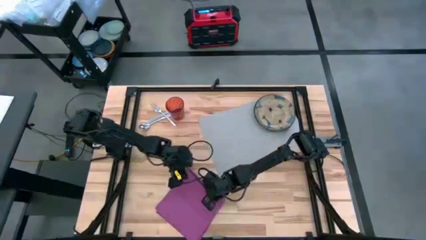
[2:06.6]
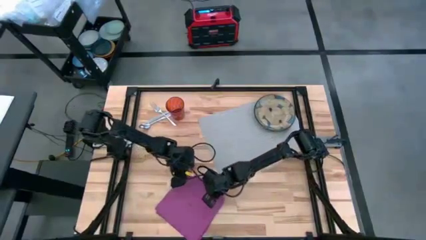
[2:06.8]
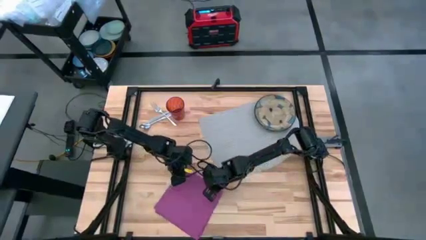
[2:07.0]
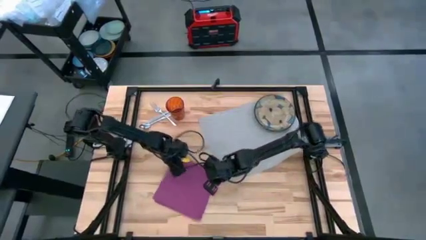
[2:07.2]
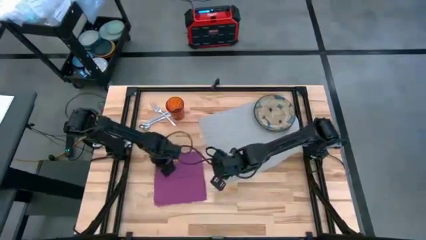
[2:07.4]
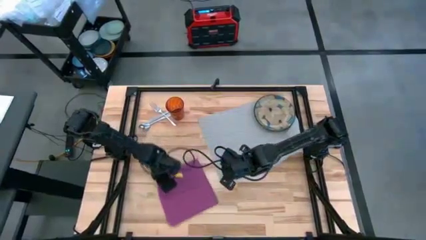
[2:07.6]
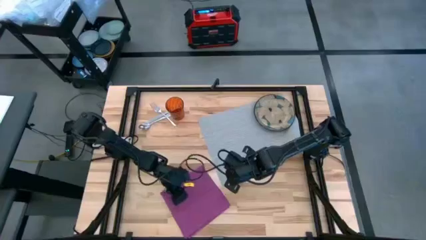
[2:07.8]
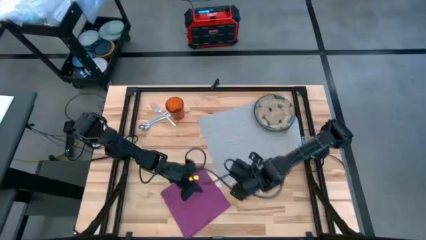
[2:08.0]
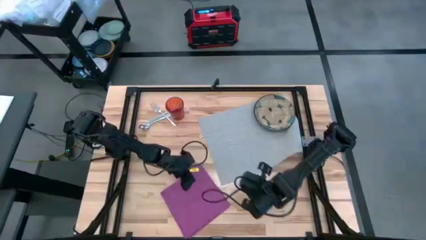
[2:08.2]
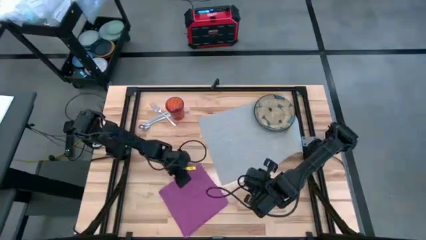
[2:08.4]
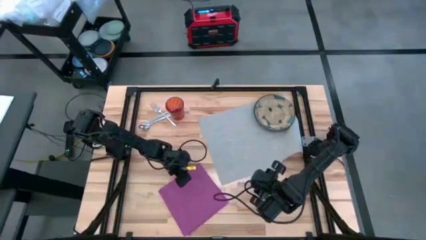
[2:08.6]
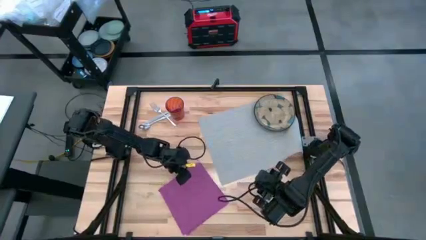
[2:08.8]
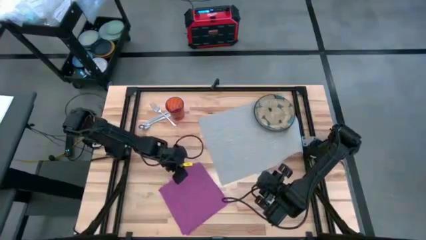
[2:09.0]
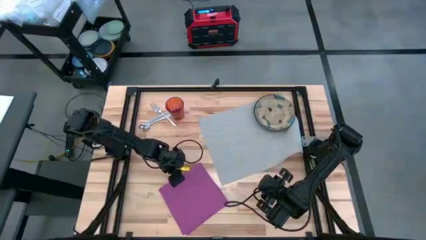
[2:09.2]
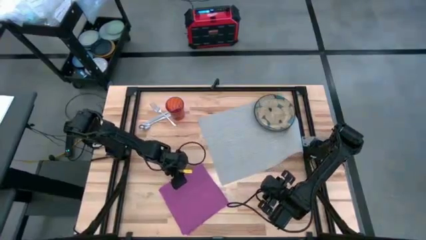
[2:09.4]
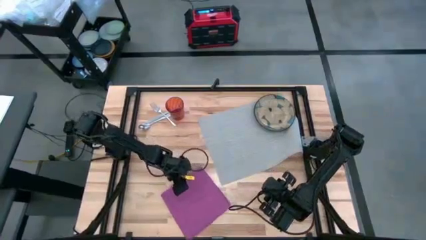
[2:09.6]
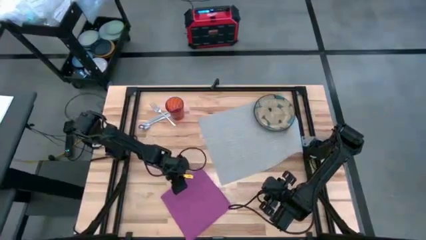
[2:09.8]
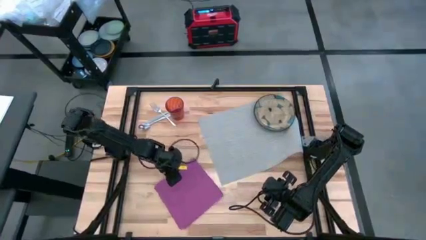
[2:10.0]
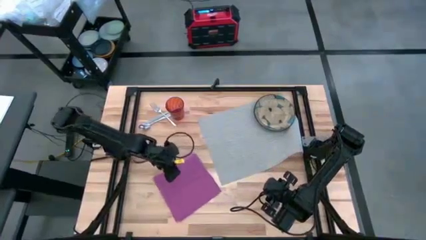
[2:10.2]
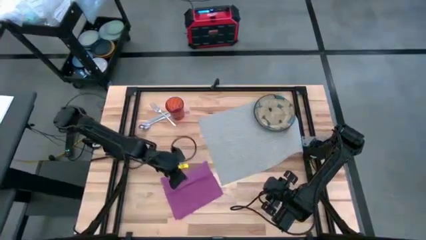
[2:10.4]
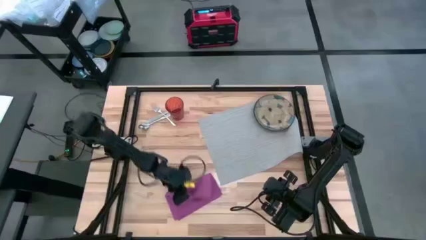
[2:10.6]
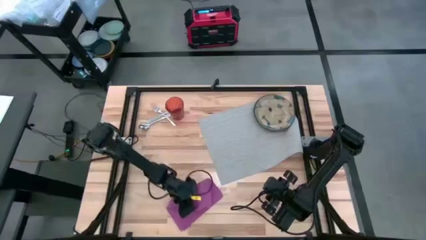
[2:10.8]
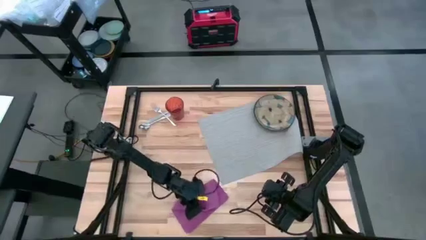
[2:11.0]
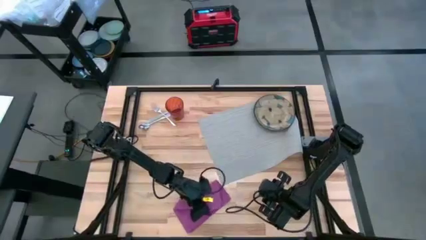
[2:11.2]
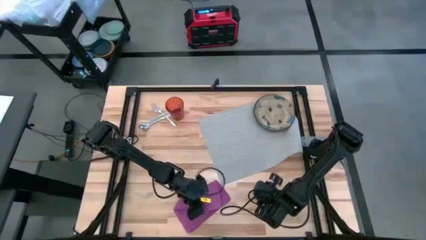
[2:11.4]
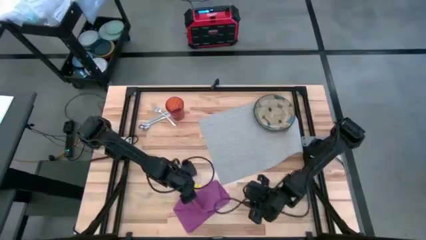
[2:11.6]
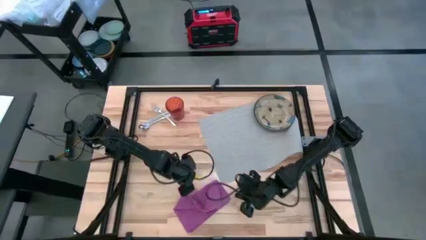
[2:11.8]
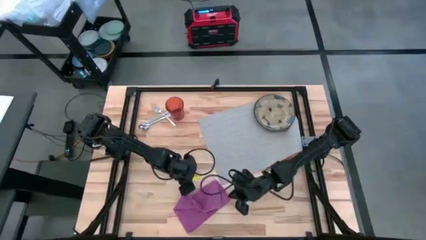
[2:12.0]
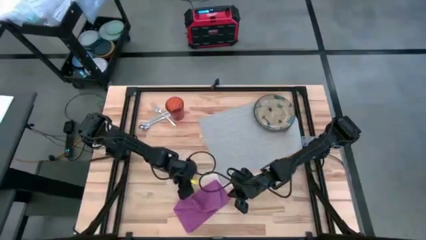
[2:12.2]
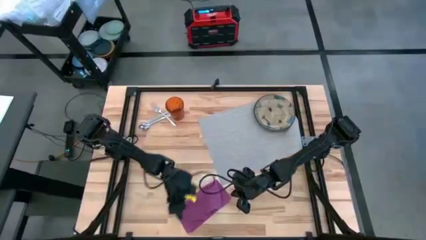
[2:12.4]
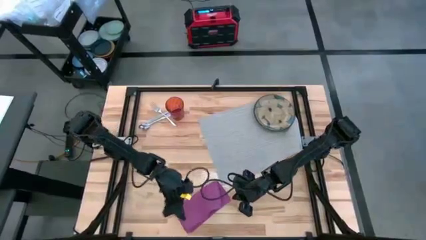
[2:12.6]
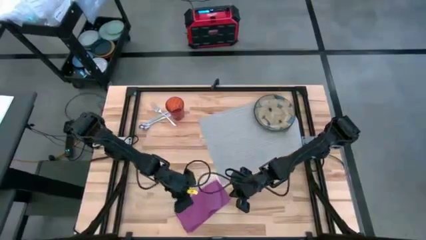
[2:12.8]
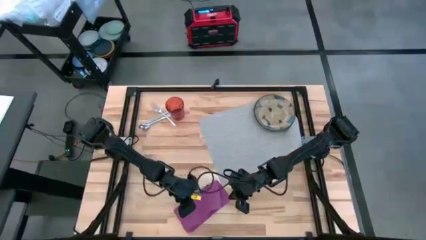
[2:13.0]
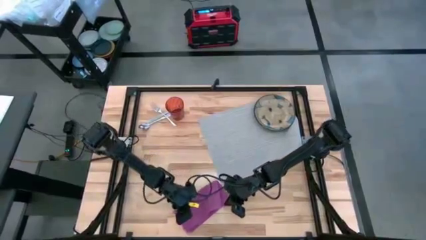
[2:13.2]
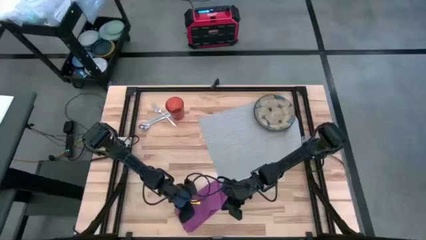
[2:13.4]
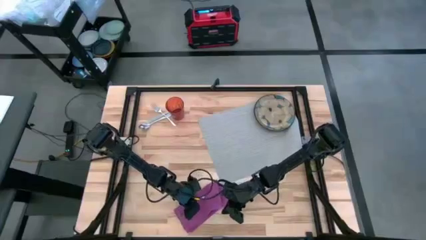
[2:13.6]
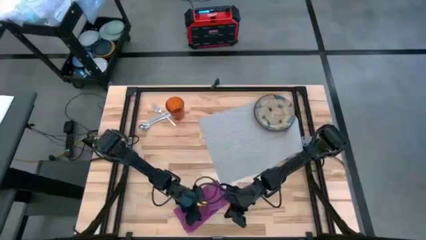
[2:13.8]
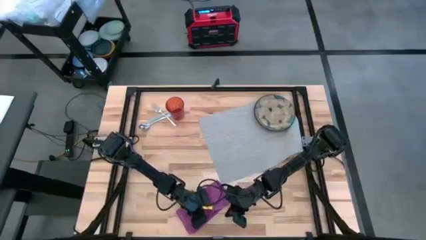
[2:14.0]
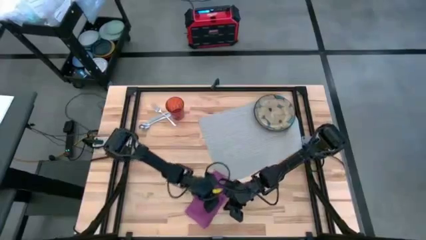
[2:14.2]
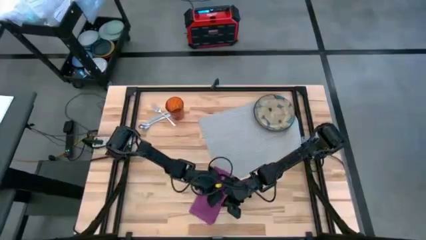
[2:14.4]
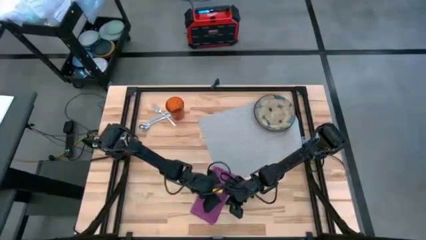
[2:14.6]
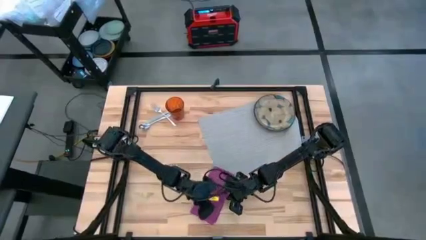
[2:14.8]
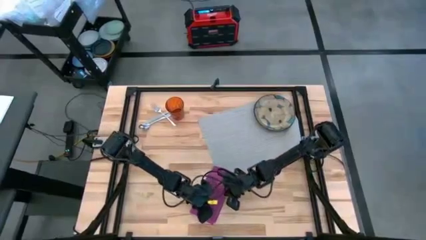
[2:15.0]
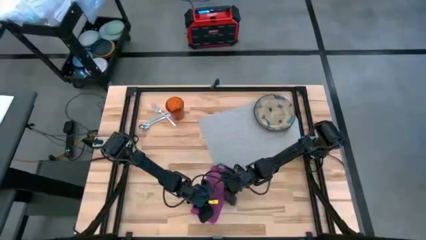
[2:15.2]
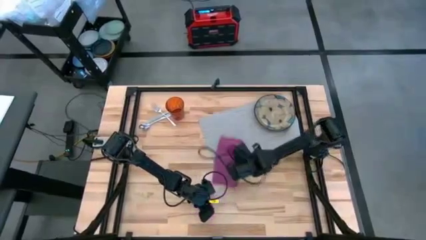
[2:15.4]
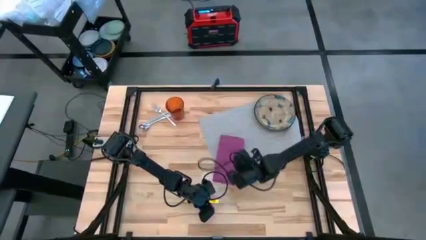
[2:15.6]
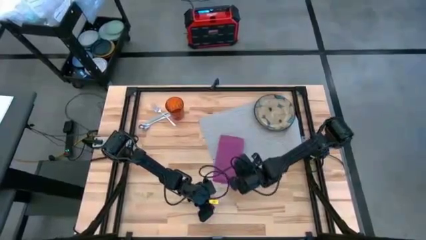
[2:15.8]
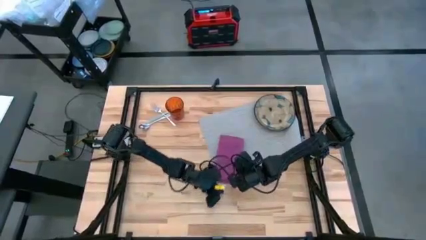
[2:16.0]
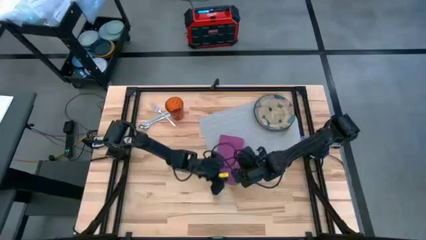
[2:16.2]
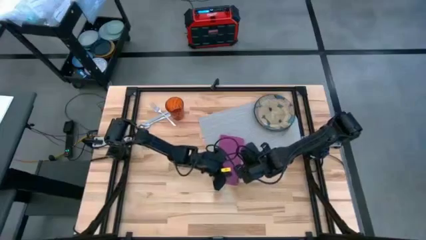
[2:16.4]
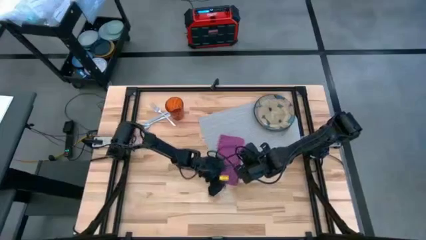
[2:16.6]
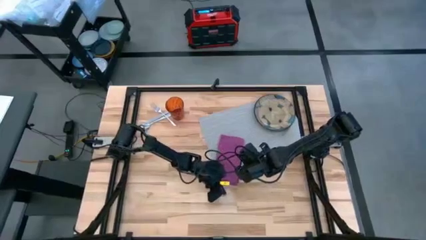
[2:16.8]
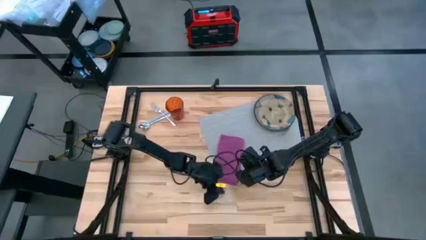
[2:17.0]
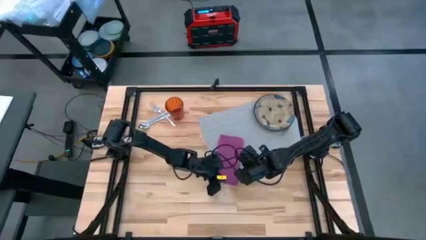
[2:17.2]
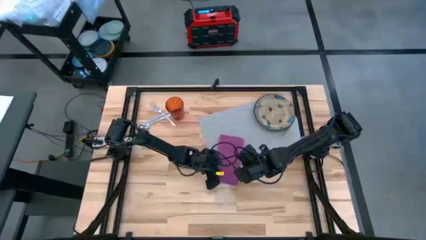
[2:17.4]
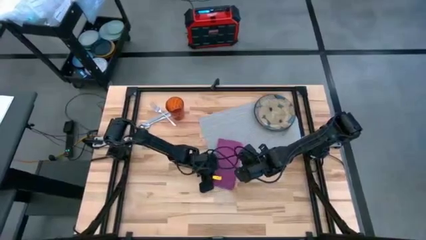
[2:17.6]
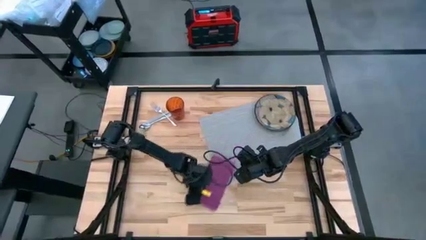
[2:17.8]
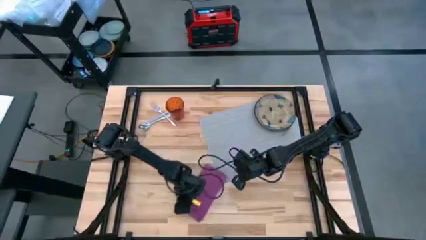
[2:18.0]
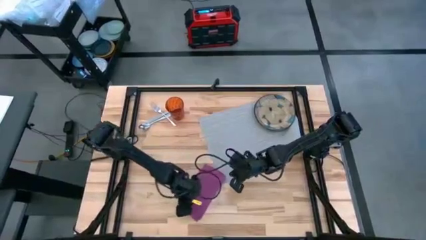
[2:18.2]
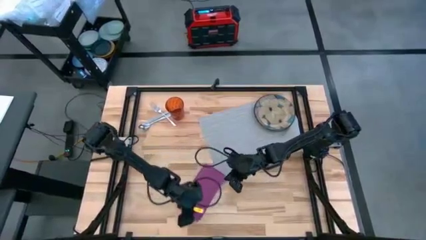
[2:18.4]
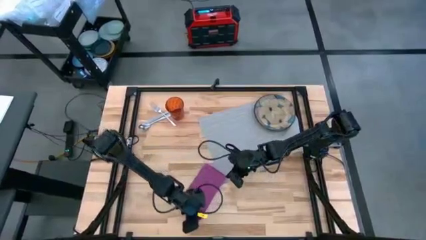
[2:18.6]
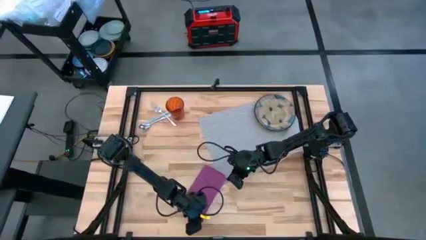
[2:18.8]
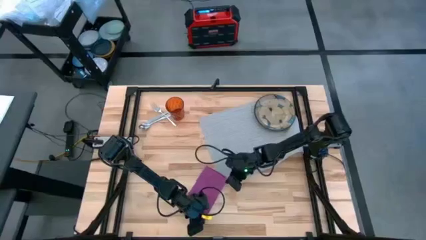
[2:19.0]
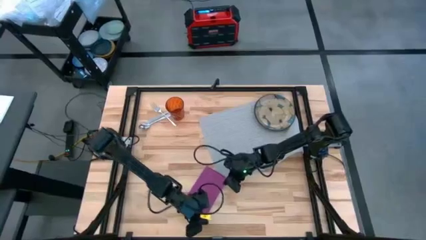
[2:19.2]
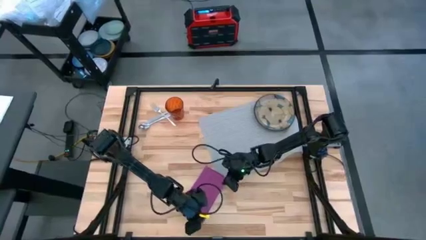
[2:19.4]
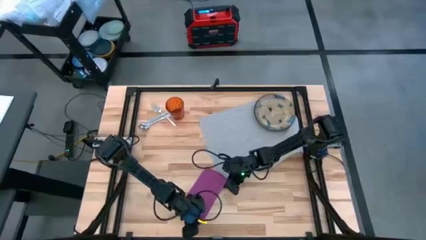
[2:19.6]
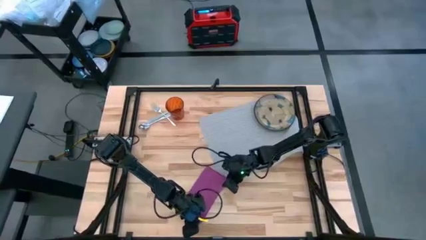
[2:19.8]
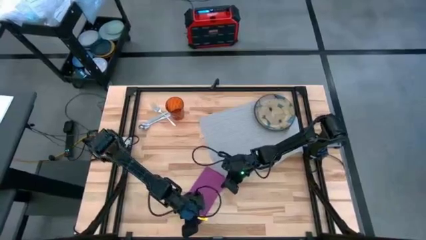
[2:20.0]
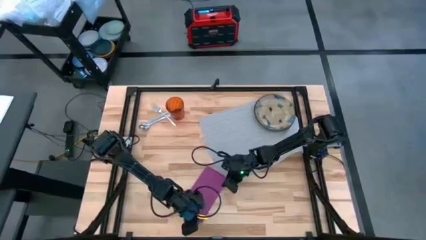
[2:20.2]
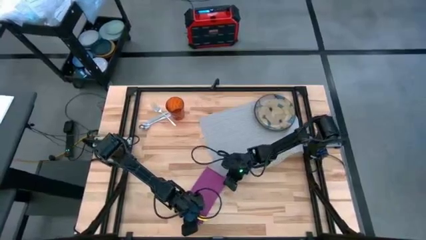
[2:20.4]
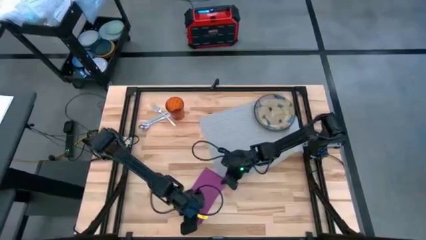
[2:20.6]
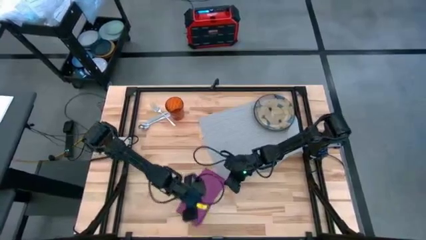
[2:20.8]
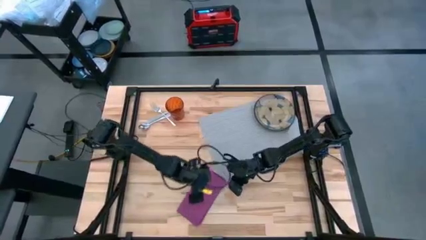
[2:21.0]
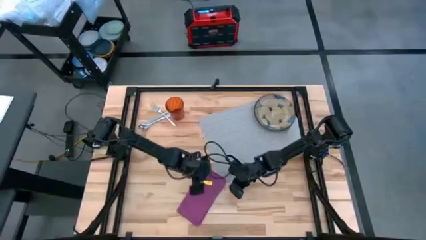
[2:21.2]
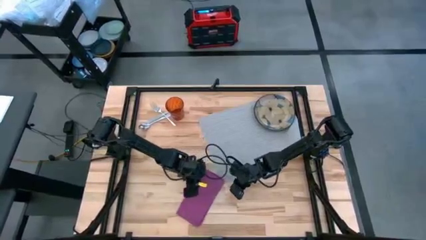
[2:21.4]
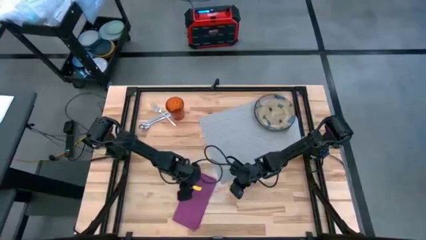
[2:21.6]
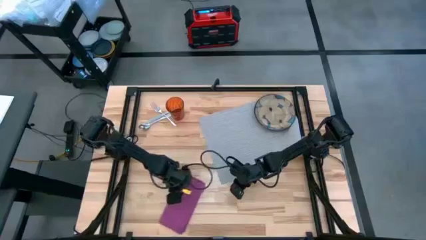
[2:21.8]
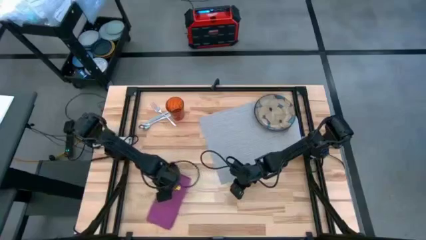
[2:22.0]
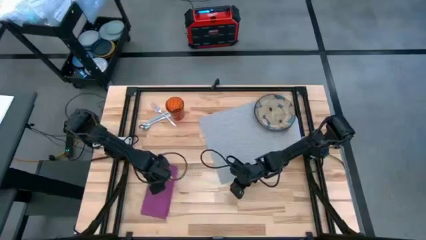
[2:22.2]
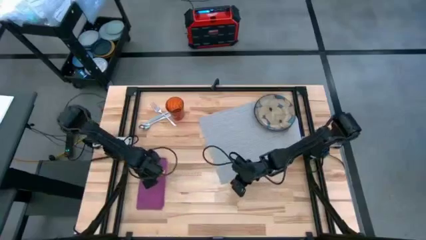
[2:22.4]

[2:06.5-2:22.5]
Task: Set table place
Fold the purple napkin

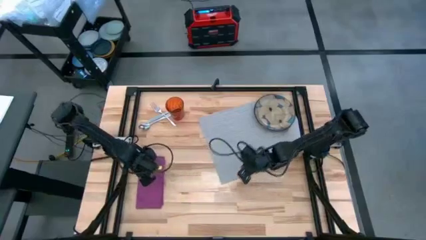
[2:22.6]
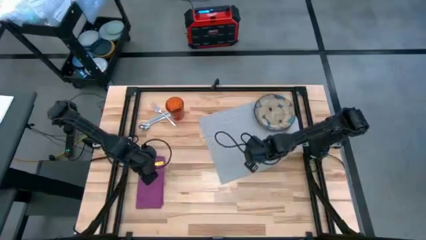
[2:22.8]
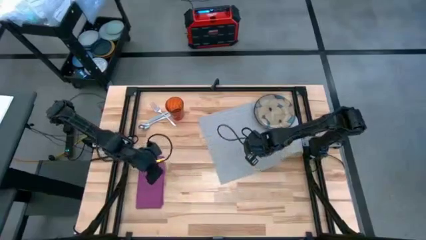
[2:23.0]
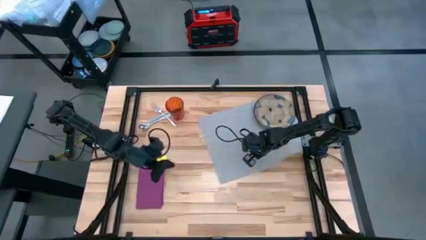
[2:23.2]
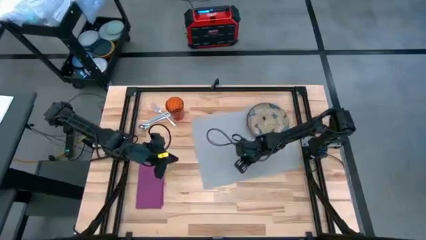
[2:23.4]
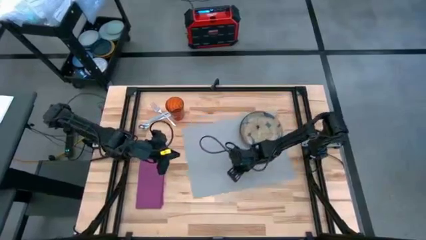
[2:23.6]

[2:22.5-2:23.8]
Adjust the gray placemat
